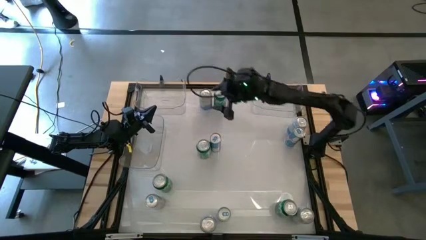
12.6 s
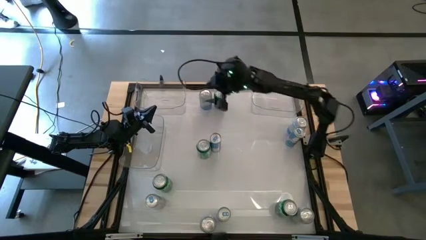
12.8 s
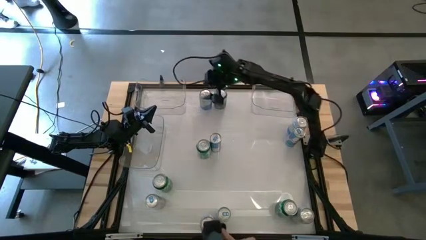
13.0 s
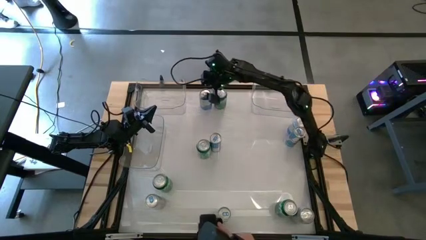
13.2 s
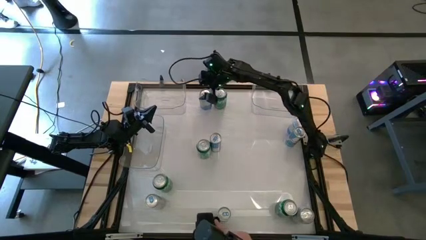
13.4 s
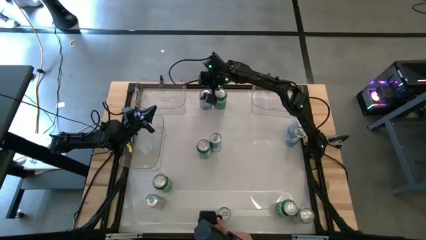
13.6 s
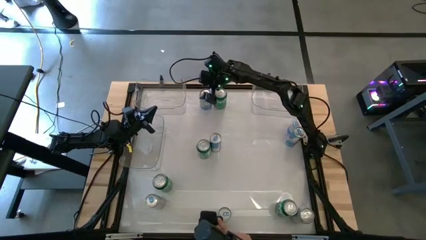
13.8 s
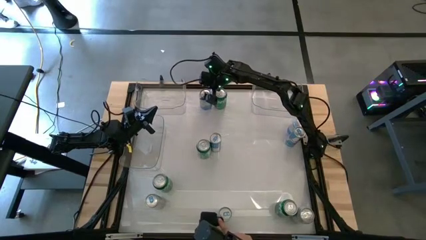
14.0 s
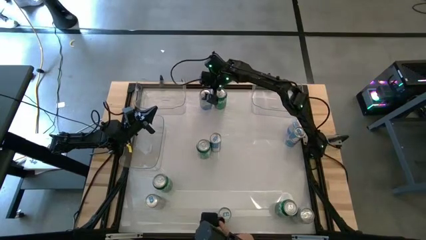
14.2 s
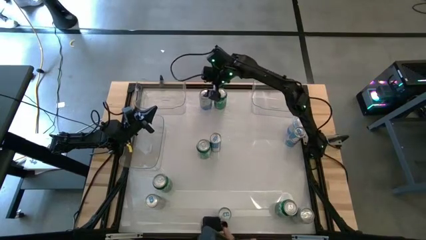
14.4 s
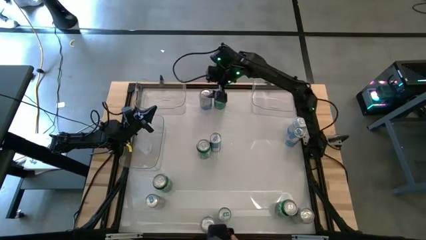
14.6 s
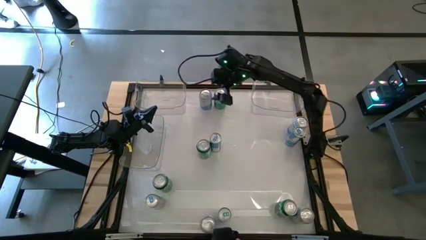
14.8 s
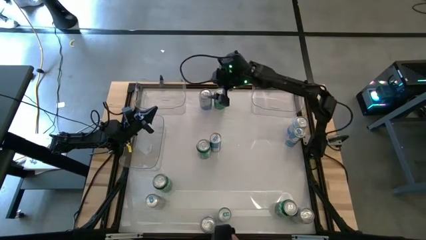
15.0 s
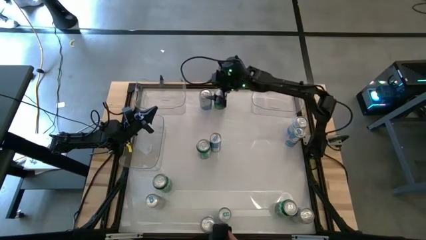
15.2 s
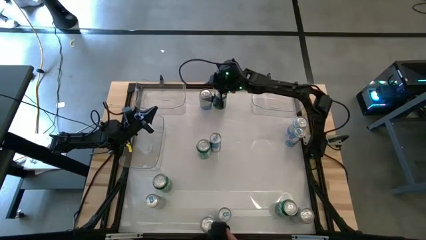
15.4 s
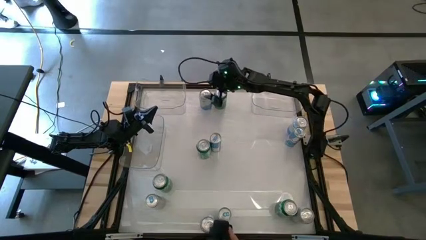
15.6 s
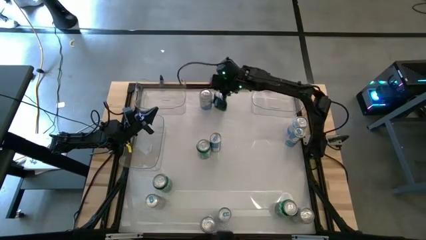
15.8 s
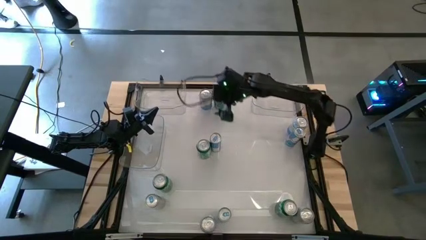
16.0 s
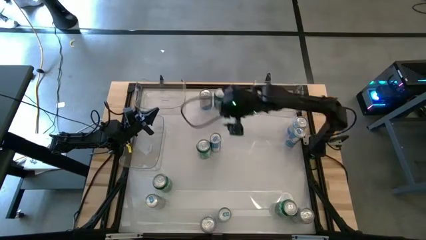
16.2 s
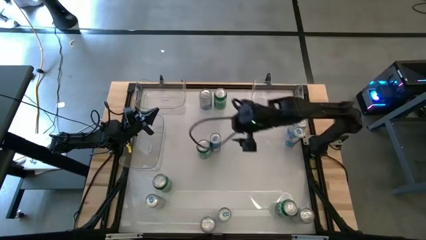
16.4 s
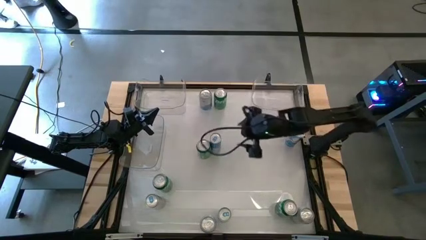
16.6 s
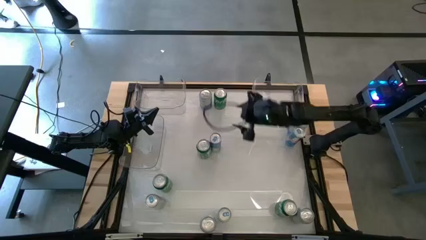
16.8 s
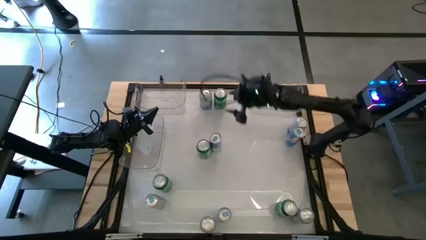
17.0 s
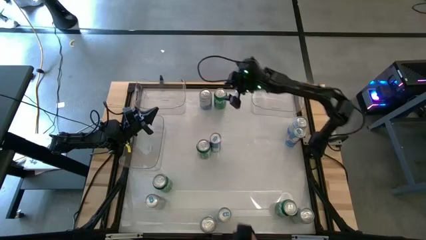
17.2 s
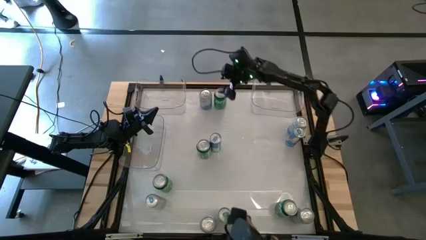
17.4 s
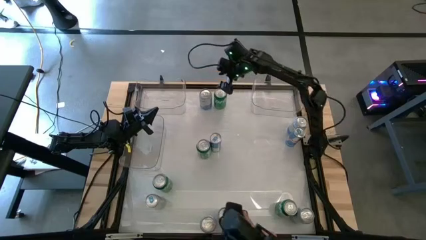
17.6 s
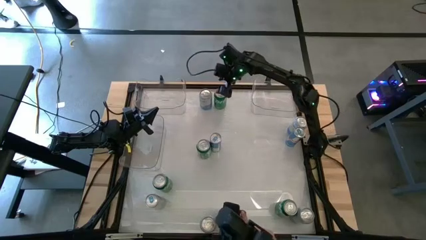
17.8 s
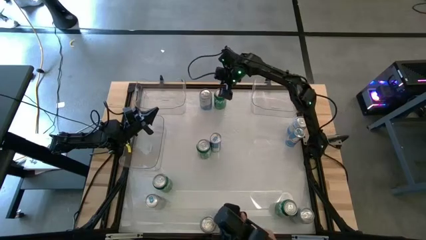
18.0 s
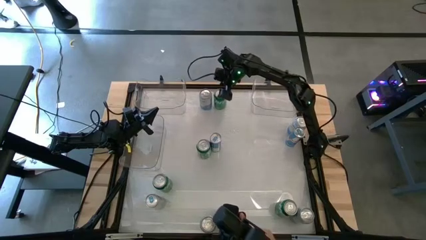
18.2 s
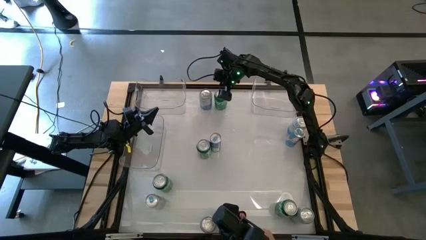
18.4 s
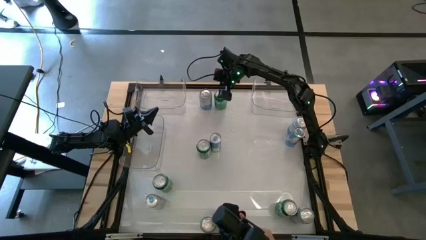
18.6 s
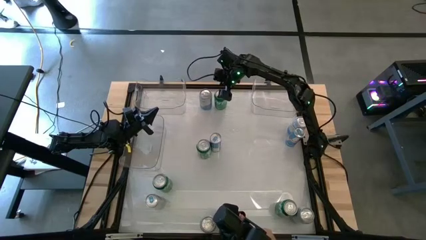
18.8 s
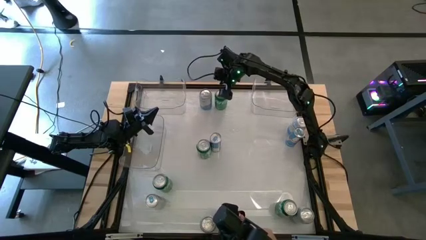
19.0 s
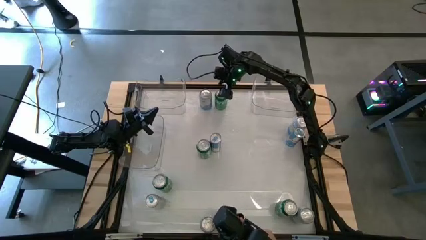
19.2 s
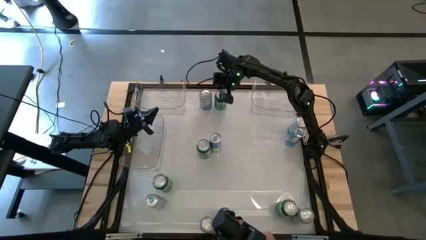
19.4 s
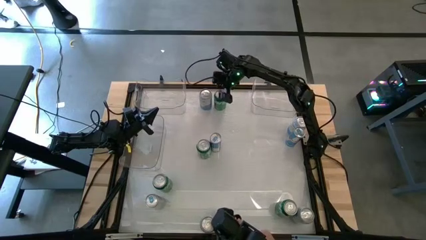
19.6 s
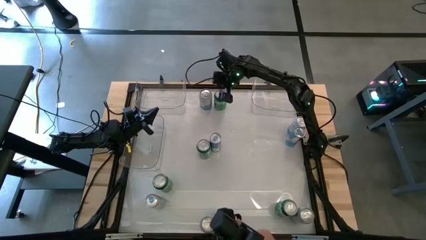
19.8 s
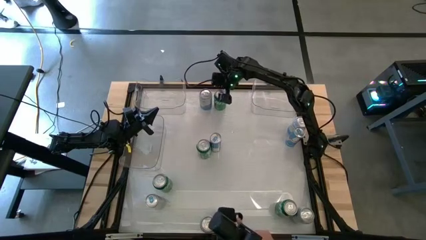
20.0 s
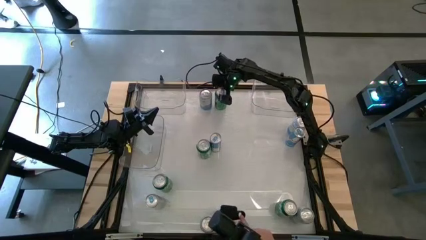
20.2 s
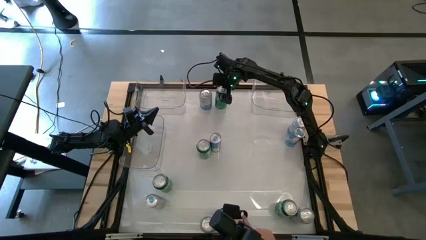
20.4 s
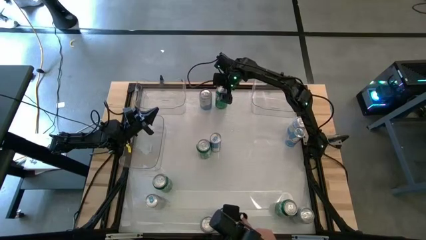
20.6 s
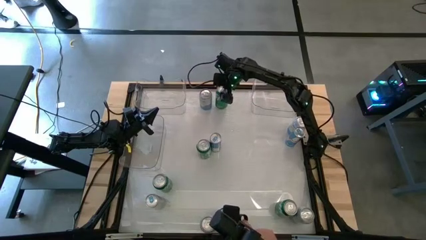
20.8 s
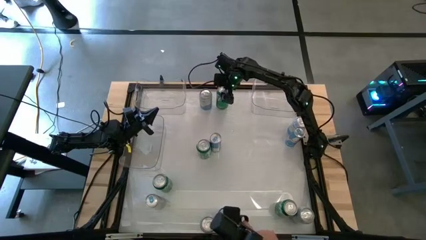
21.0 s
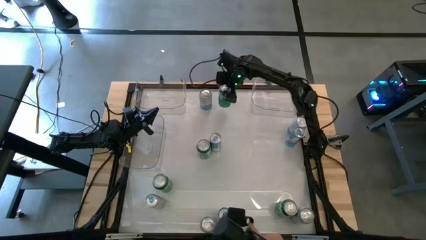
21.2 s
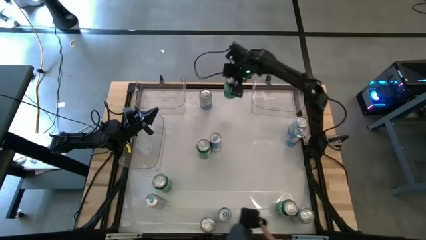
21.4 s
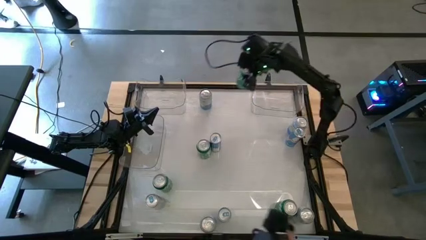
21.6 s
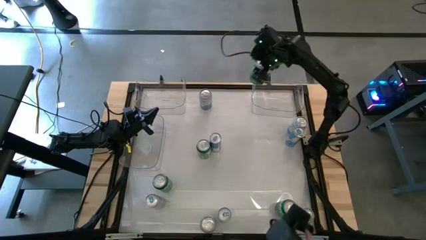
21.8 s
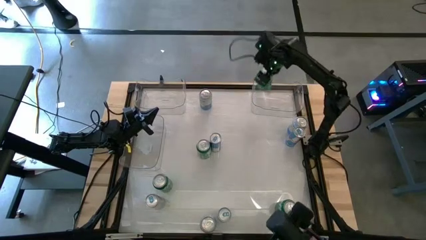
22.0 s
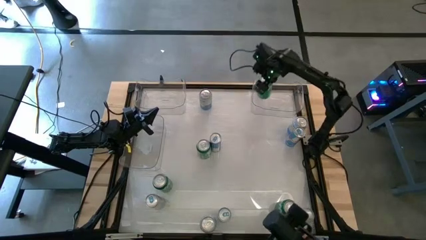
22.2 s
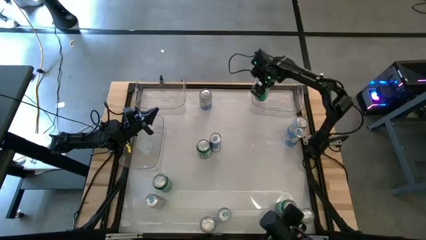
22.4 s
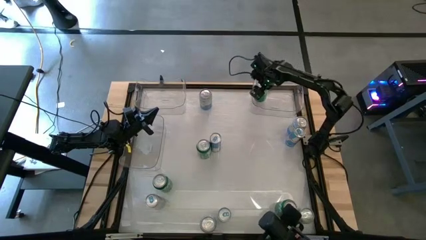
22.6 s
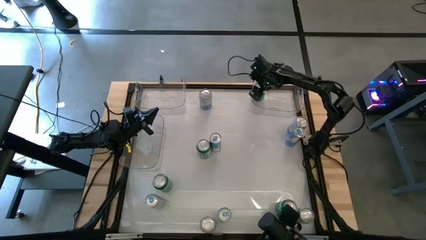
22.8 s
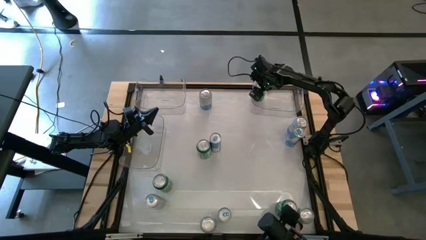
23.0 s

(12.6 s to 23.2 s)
Task: Sort soda cans
Put the top center green soda can into the top right transparent bin

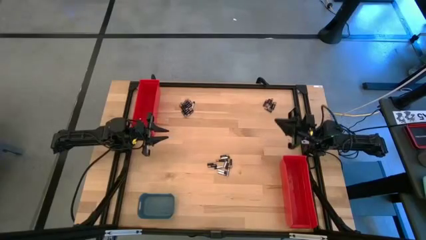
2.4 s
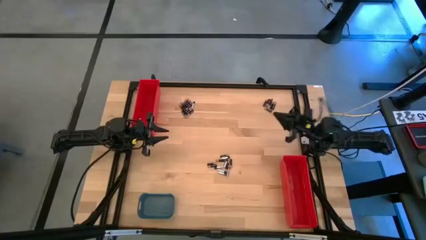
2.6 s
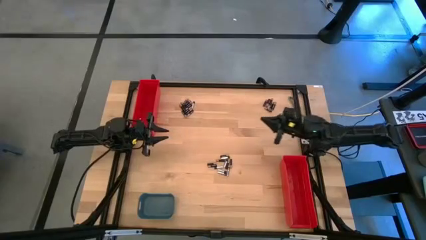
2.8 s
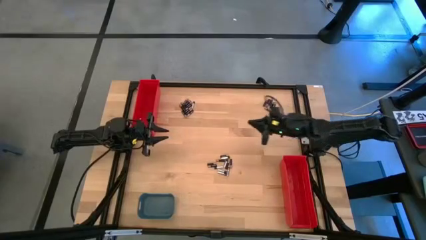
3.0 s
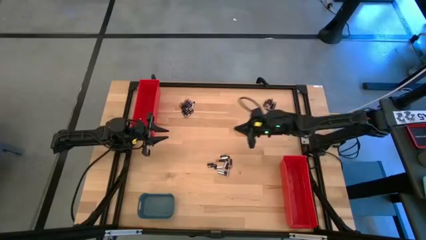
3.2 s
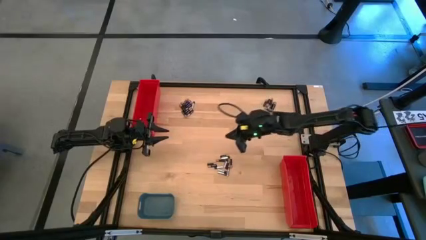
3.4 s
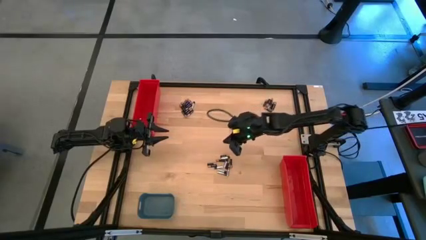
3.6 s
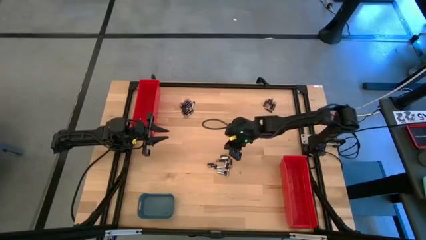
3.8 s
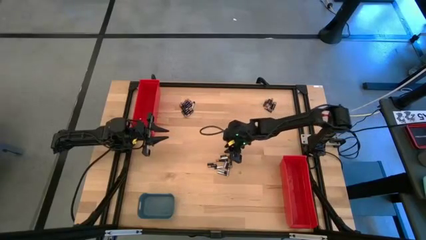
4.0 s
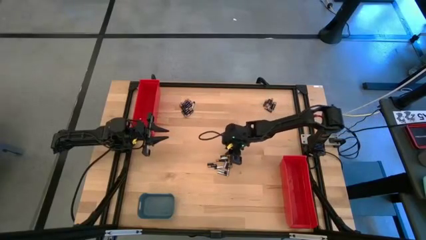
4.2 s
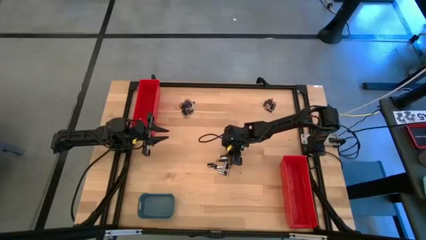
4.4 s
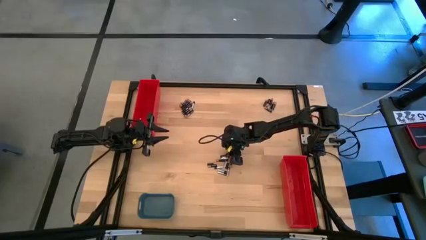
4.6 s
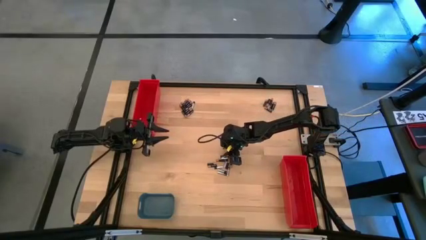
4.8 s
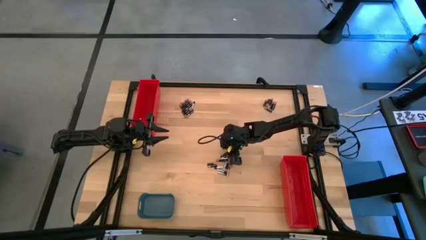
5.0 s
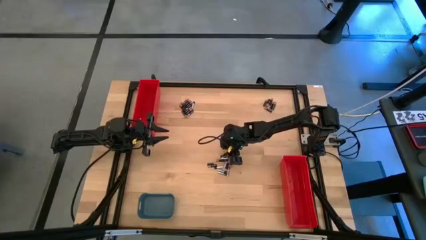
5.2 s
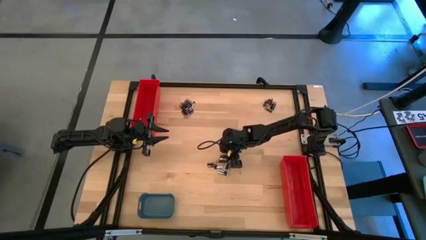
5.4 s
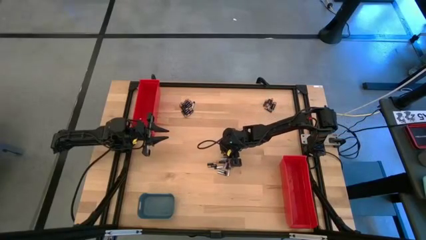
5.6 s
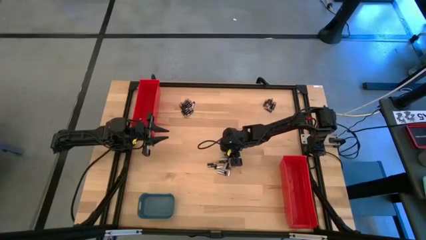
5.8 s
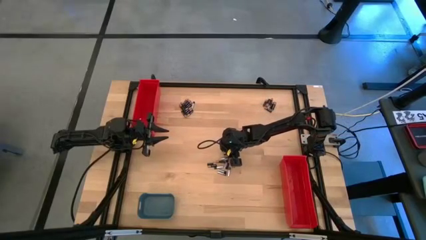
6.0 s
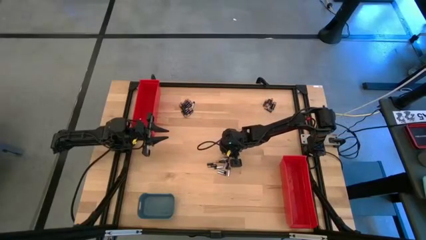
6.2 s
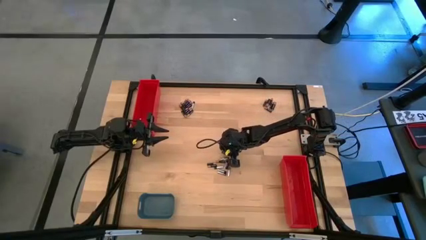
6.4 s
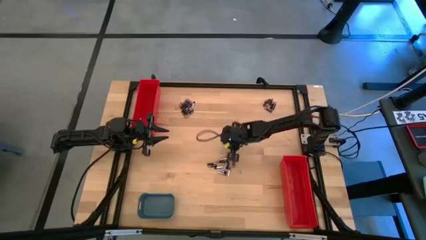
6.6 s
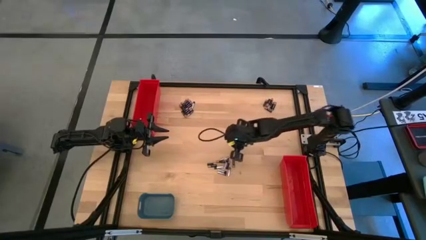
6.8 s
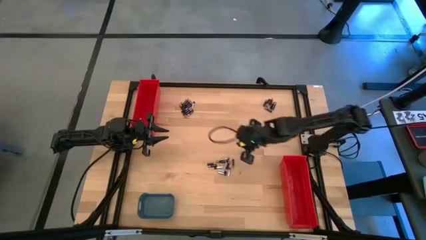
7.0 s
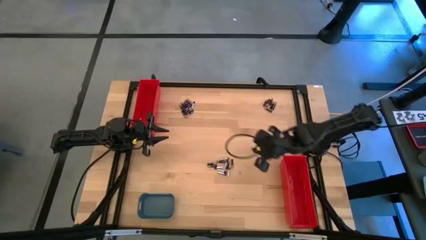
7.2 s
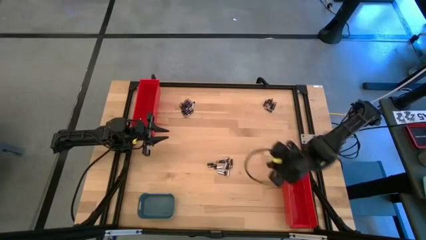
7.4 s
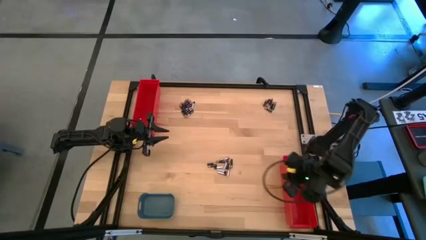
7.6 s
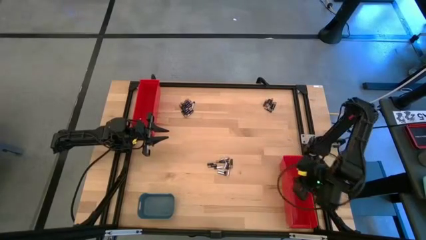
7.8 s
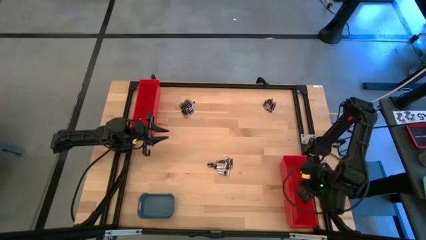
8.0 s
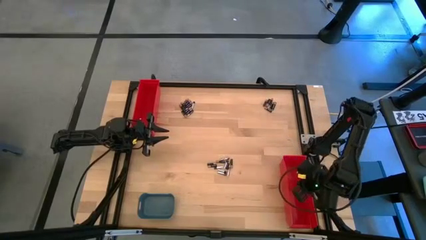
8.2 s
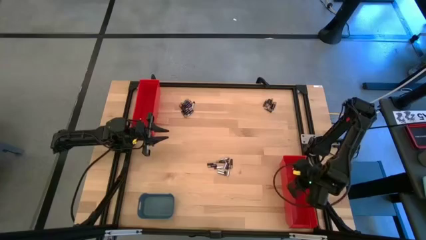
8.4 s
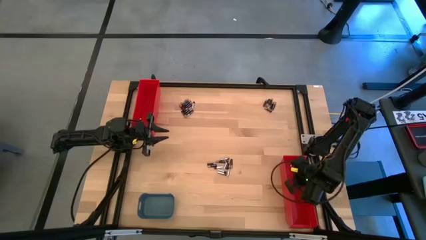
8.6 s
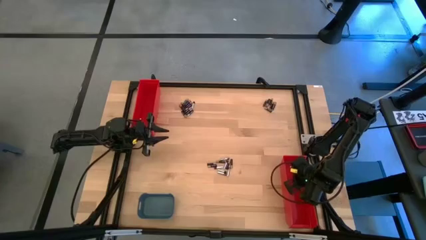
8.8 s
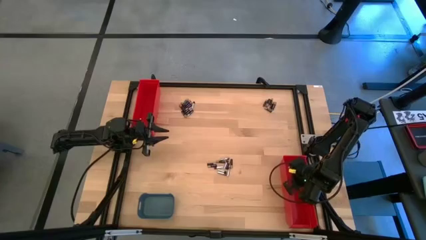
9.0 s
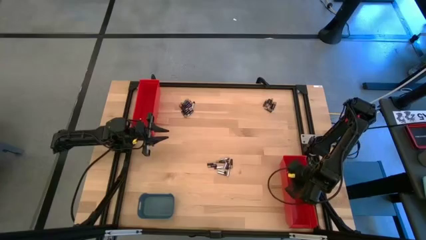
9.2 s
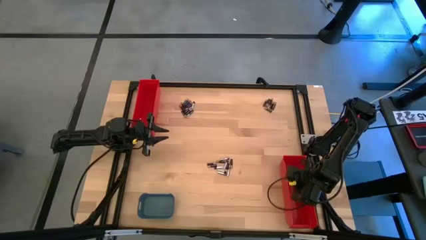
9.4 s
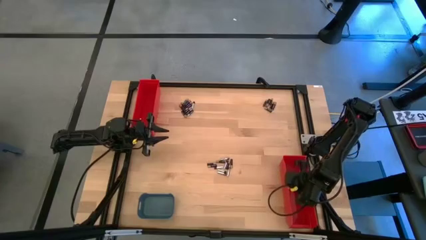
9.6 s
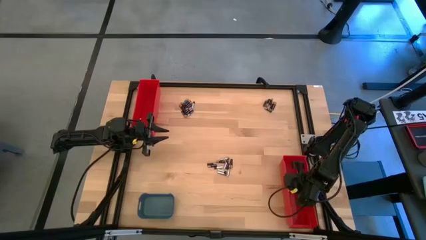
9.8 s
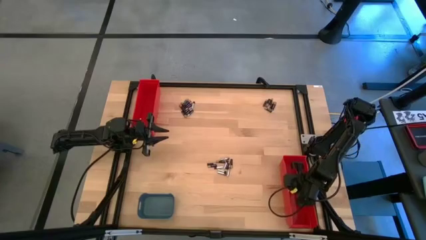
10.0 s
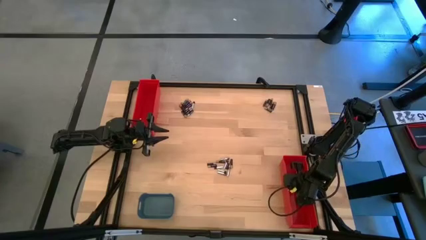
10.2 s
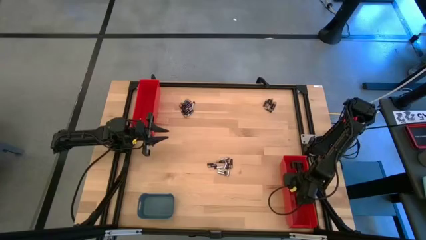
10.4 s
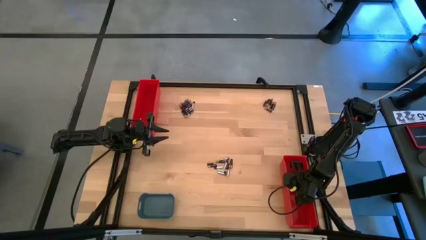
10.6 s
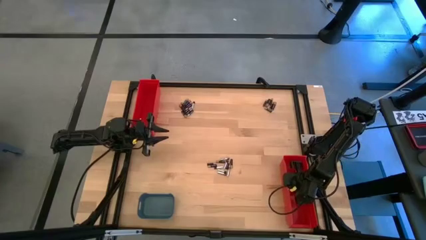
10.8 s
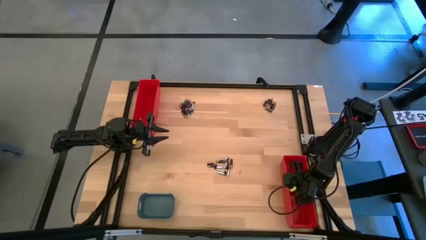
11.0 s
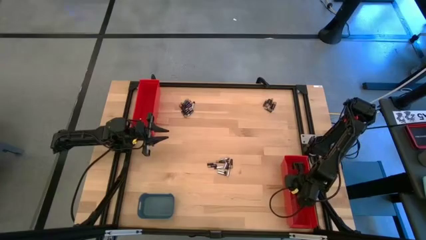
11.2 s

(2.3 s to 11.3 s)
Task: Sort batteries
Put the small black battery into the bottom red bin
